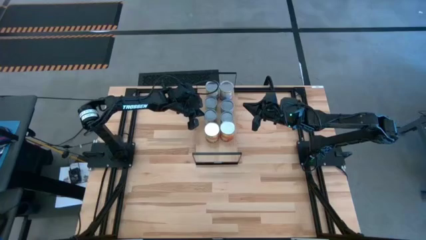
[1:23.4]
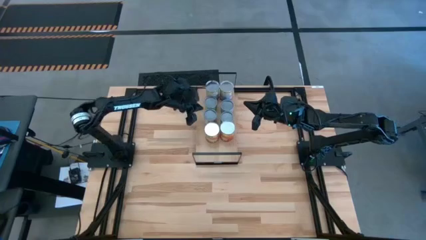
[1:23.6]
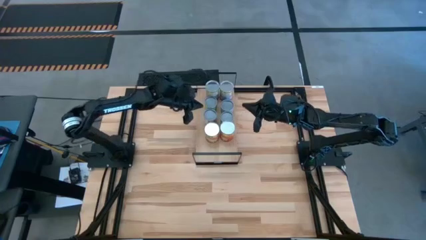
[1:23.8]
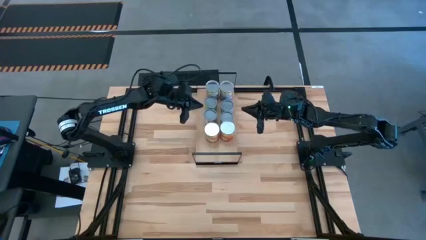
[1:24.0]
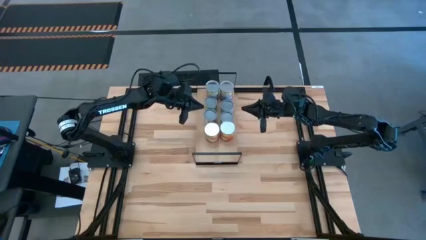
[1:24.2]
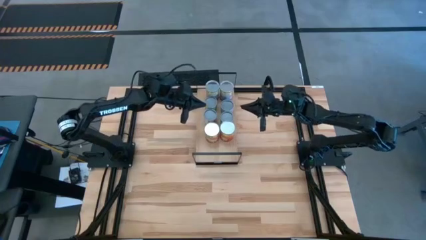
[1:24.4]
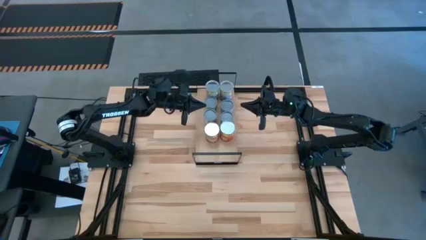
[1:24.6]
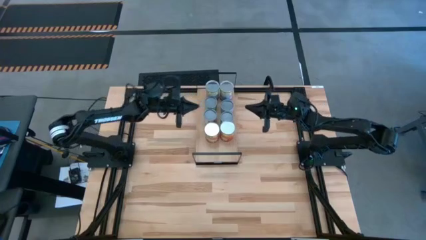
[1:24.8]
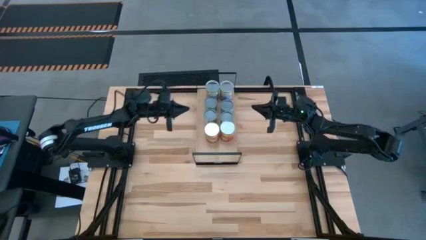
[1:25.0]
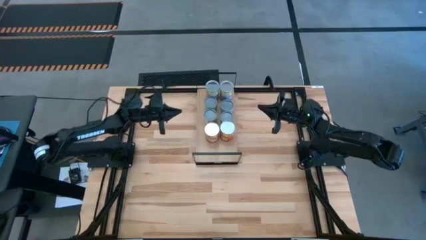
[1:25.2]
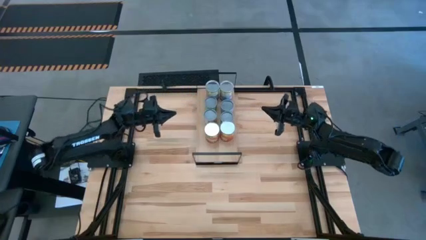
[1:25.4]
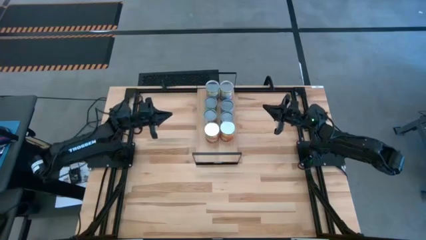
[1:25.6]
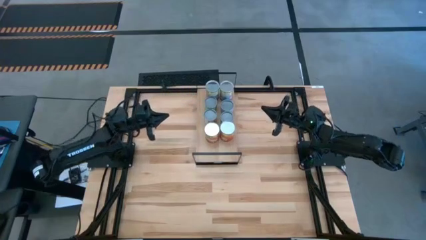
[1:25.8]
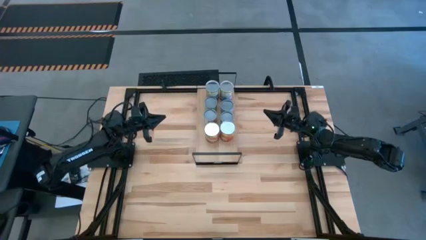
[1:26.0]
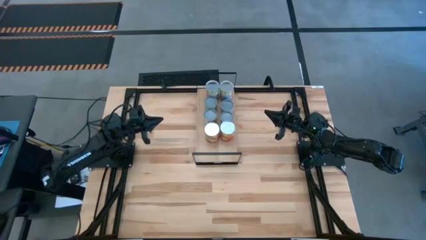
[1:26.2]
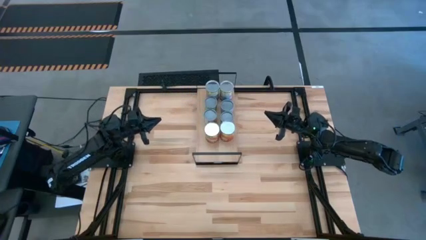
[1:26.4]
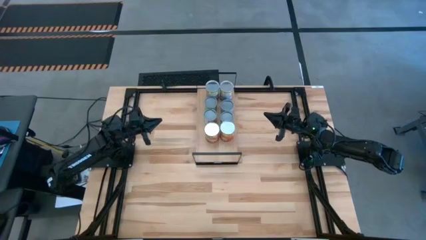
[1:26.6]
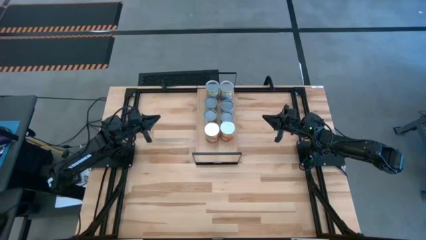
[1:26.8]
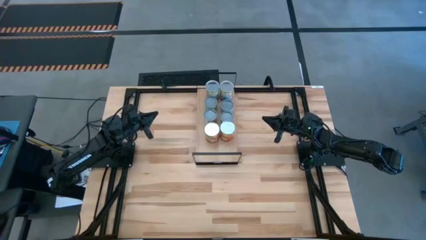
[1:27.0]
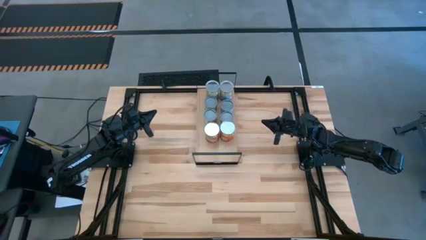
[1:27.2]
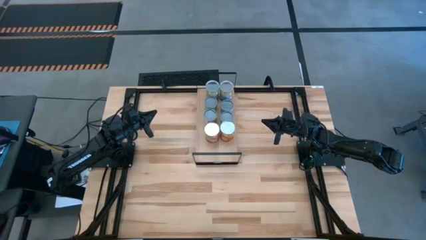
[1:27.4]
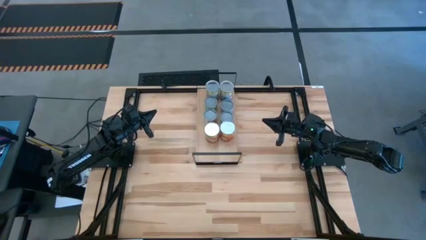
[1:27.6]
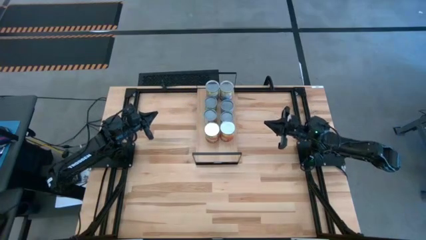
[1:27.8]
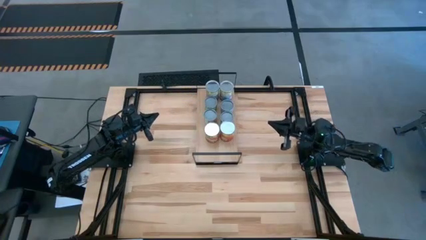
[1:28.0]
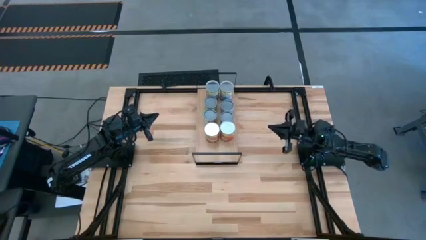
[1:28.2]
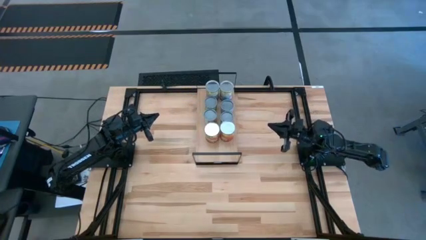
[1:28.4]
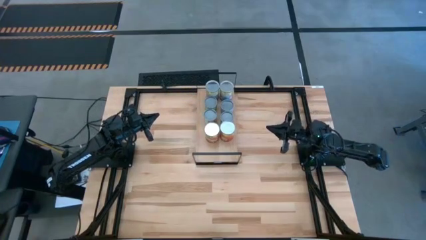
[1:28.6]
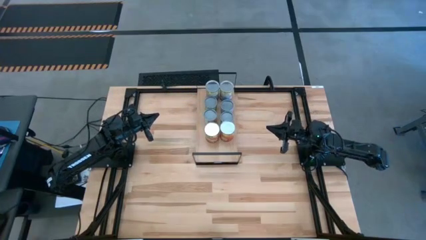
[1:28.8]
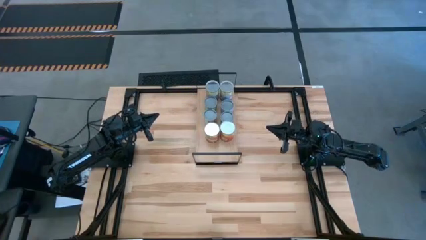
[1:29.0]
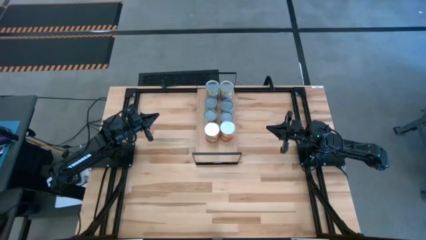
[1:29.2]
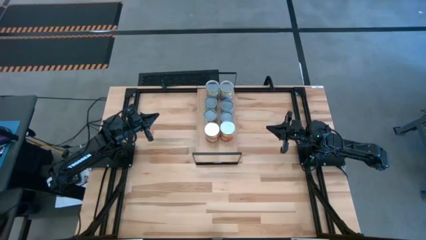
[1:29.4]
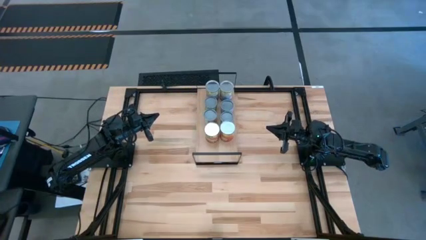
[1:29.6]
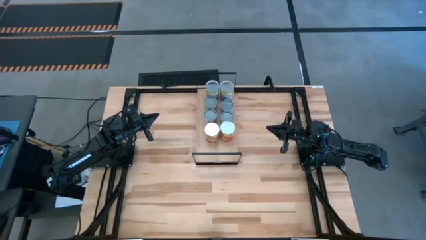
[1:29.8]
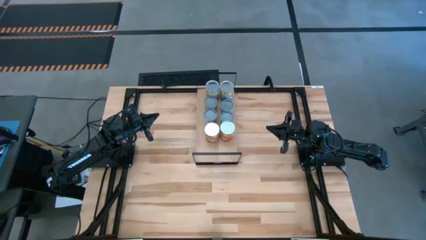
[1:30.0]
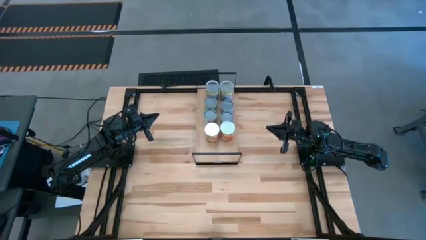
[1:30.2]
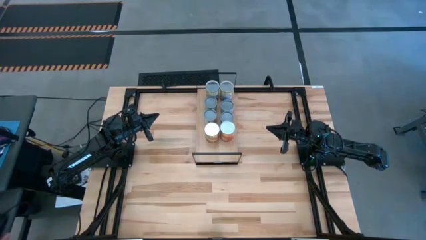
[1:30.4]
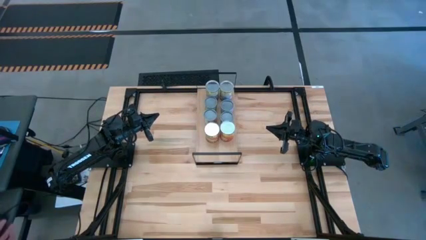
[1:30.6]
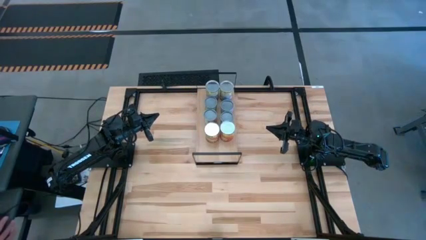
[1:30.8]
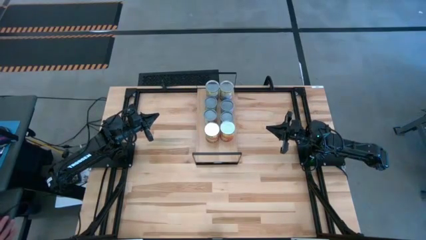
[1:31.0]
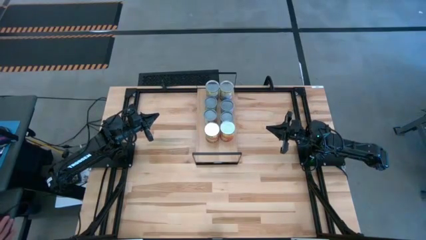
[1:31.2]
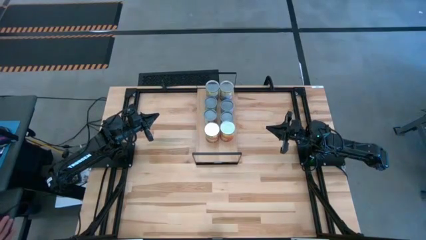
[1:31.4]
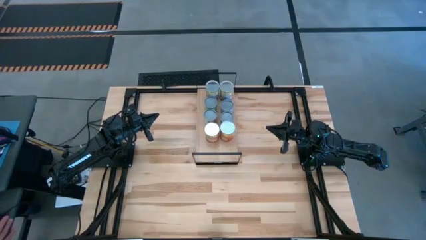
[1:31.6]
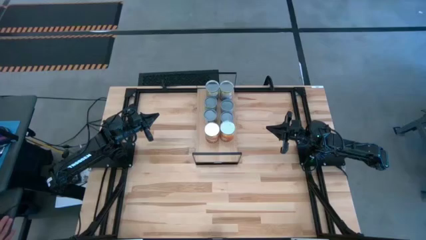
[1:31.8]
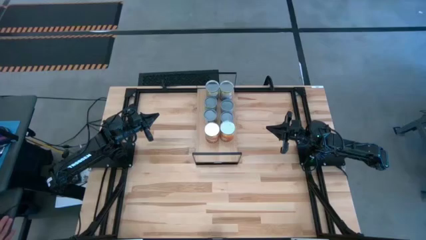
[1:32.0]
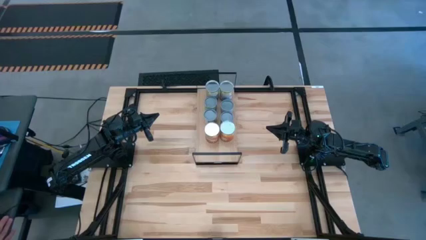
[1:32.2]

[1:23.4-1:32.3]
Task: Pick and place cans onto a shelf
Return to Home Position

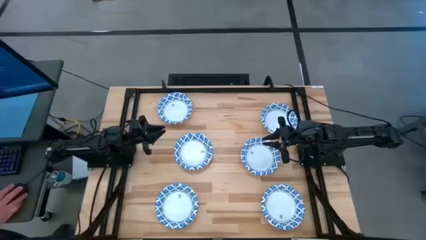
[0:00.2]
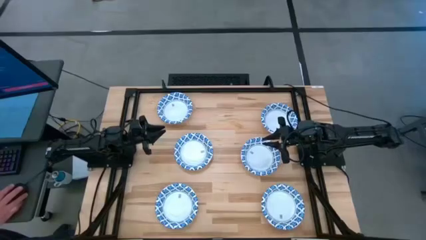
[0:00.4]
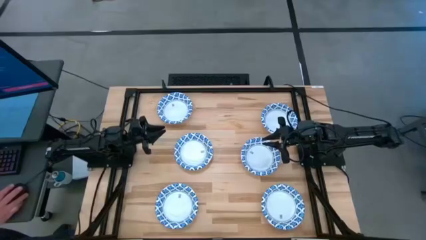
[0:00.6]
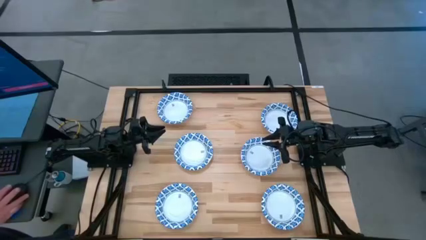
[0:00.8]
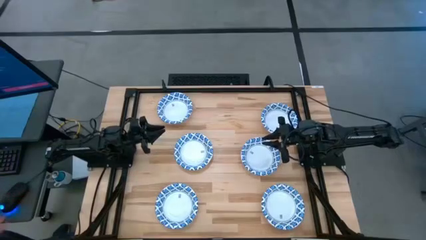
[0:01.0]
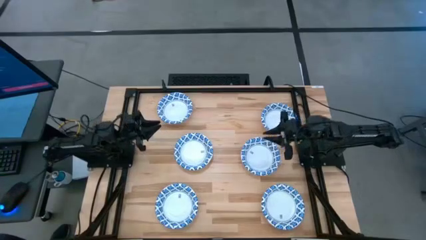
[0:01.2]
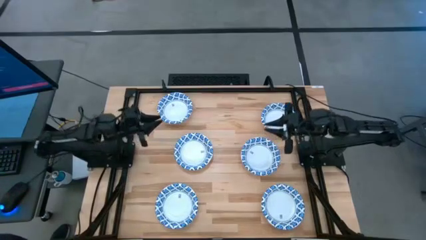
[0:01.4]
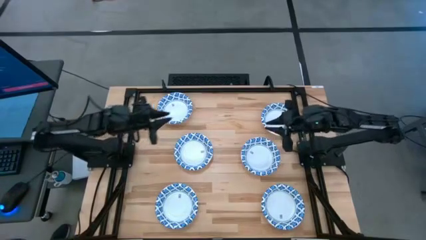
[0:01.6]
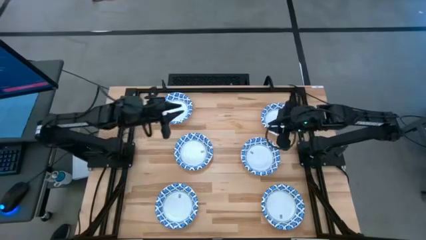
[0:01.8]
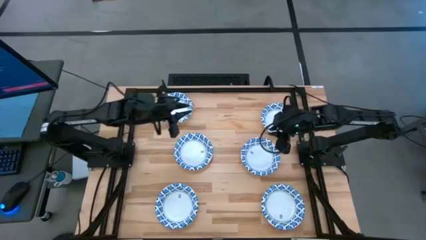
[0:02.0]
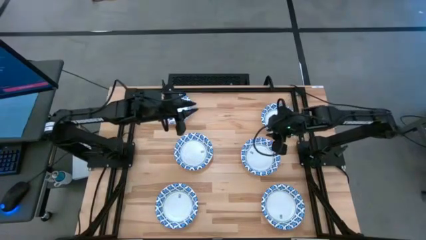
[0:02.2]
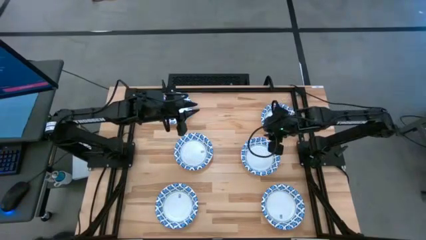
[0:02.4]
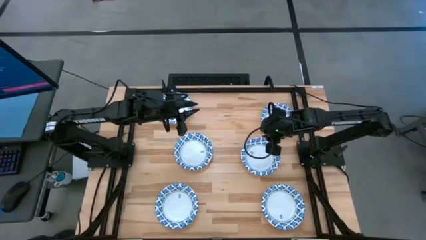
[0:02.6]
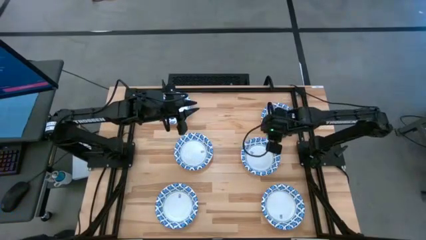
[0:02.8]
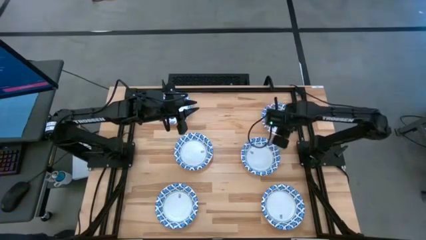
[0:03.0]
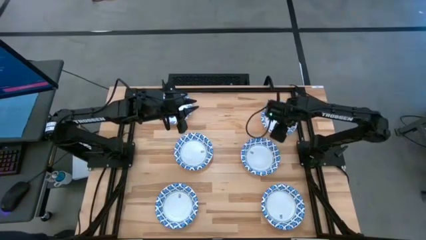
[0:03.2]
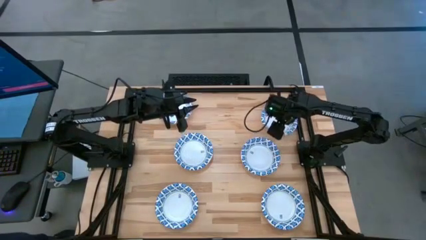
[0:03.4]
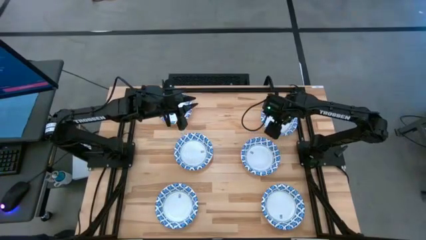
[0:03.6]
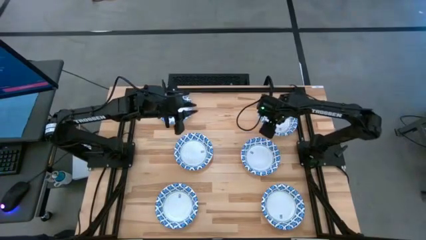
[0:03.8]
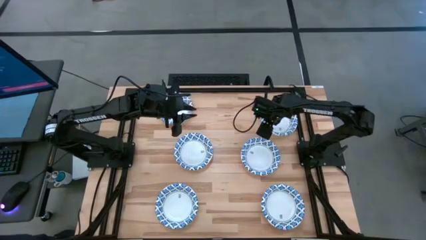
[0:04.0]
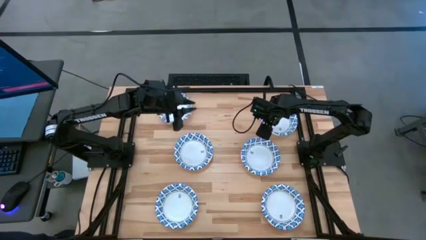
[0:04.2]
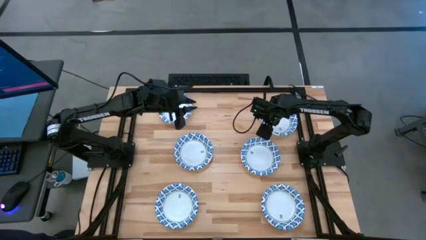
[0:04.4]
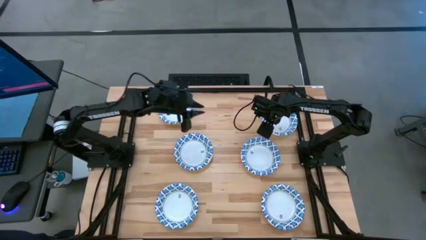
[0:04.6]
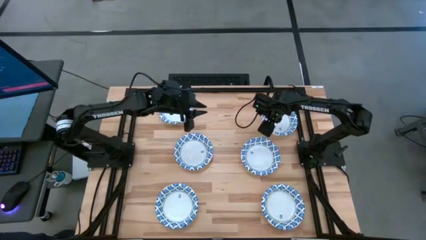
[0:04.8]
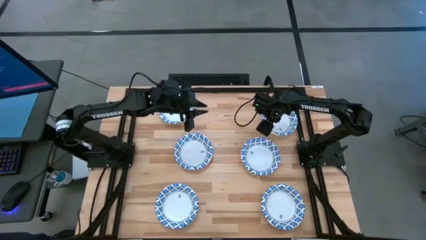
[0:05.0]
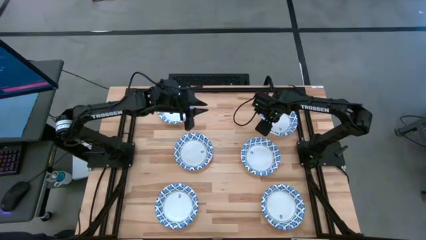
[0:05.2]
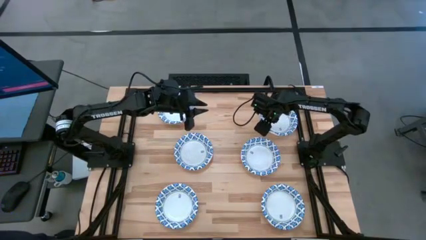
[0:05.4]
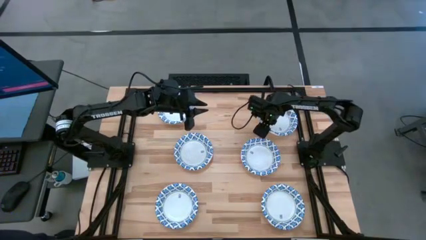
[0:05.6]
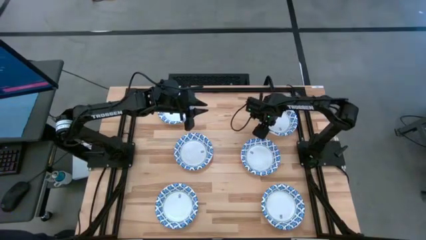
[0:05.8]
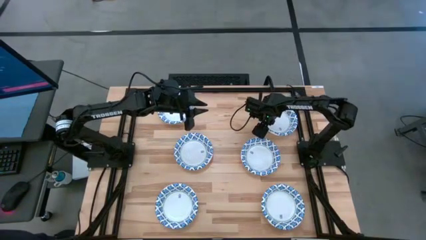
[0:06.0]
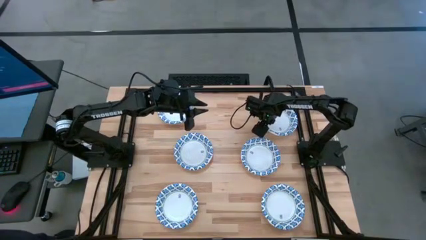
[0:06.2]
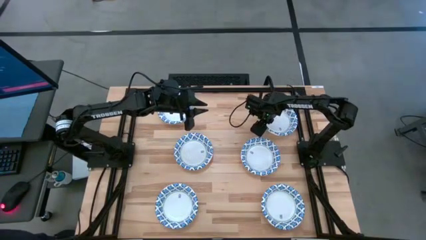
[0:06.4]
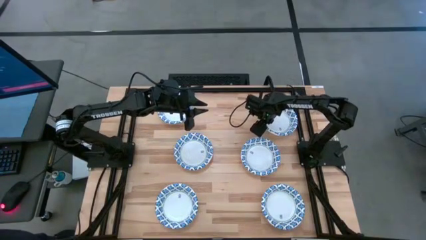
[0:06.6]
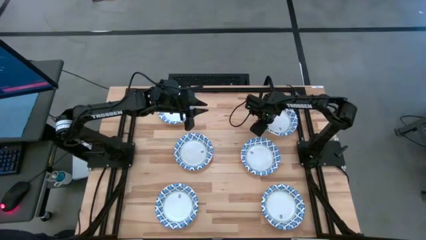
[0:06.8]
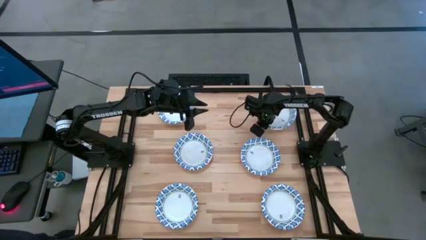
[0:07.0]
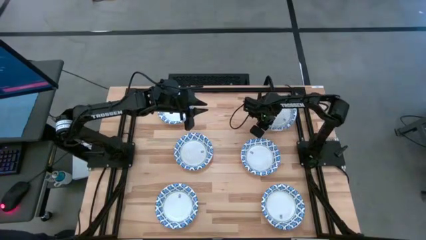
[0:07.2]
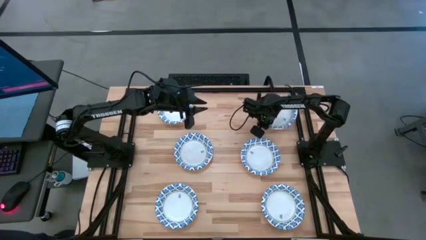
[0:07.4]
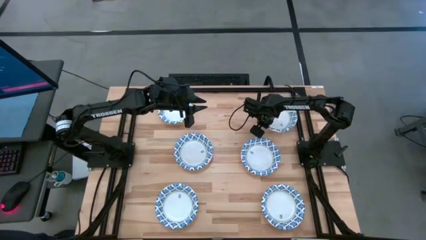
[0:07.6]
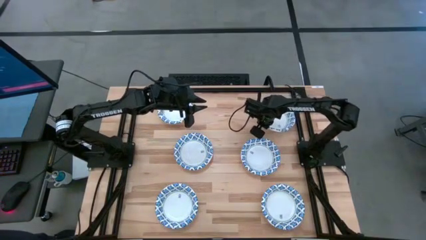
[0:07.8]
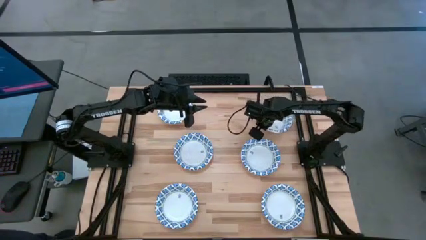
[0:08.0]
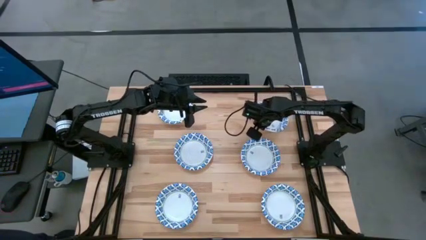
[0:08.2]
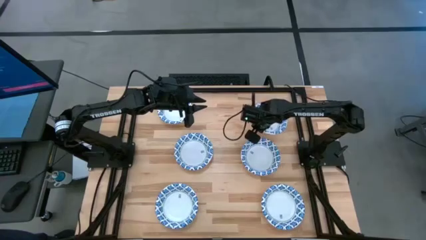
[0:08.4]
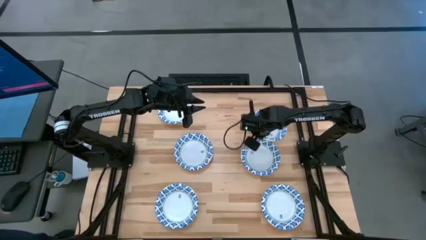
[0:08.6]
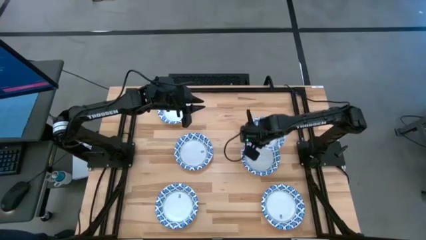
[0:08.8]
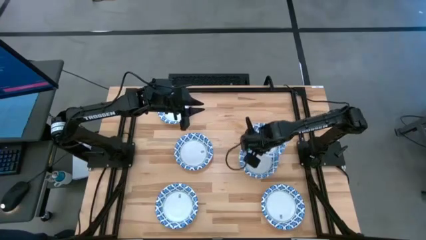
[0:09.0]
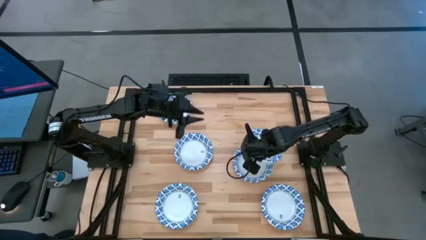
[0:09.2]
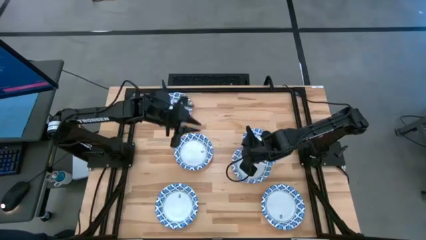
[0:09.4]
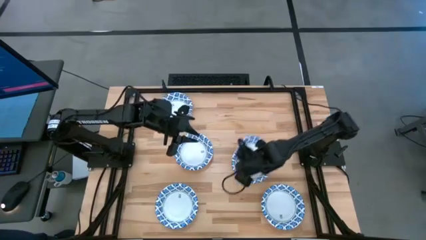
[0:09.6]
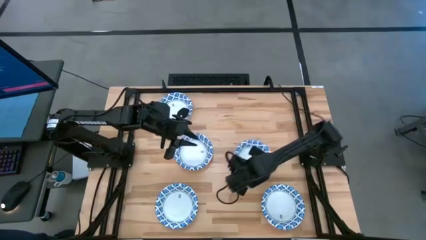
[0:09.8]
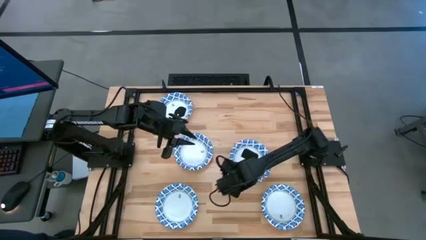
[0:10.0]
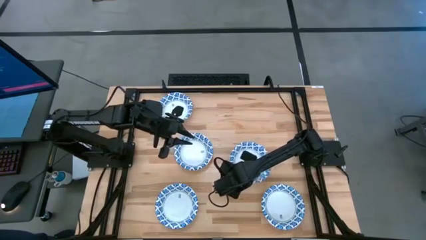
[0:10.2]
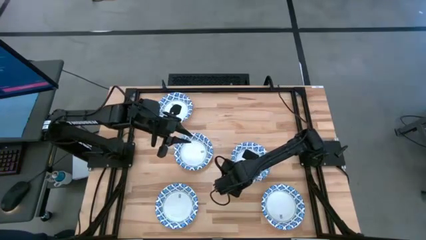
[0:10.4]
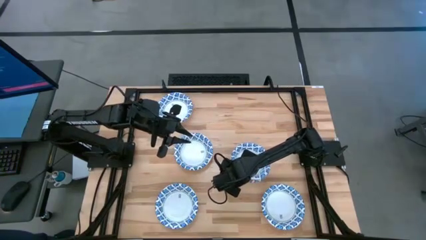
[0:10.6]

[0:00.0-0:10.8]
Task: Nest bowls inside each other
Stack the white bowl on top of the other white bowl
